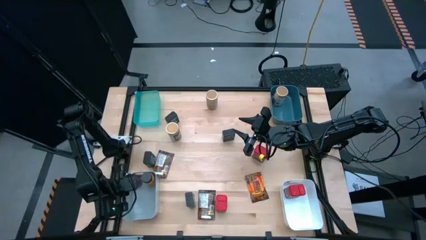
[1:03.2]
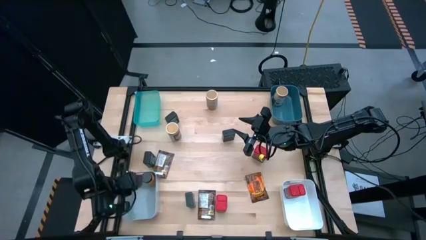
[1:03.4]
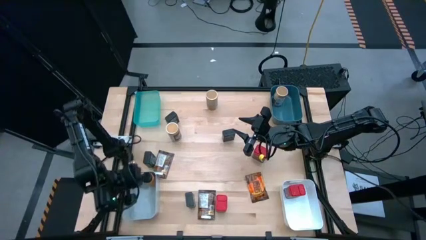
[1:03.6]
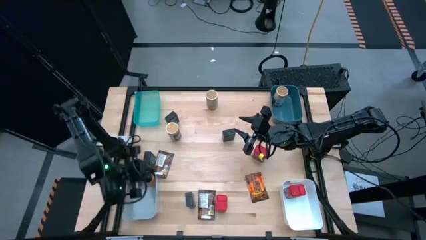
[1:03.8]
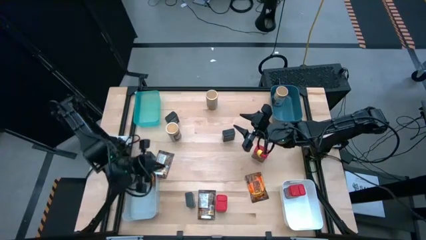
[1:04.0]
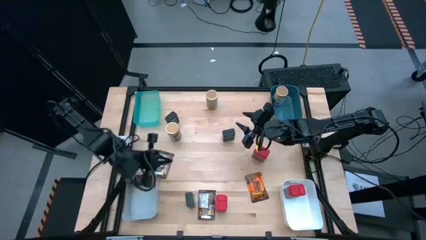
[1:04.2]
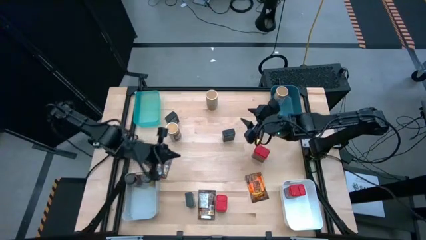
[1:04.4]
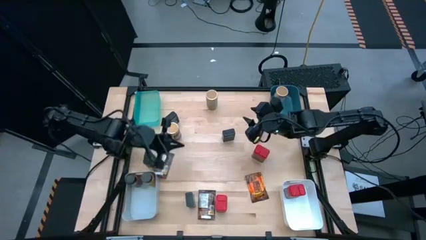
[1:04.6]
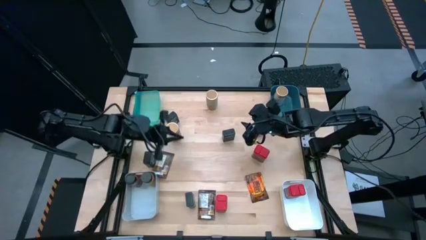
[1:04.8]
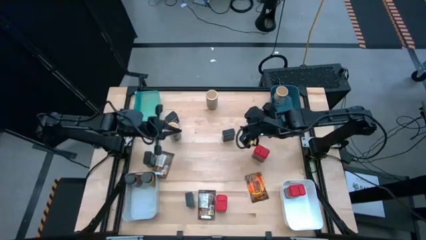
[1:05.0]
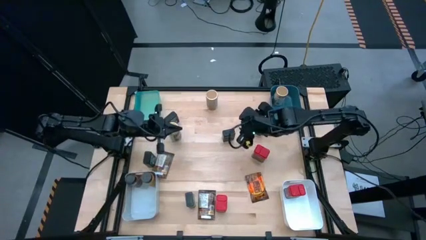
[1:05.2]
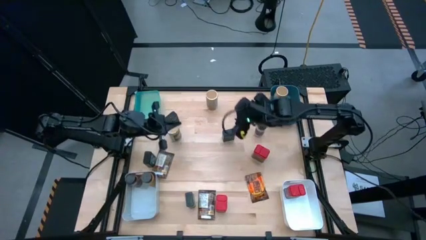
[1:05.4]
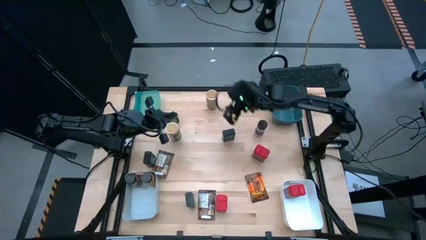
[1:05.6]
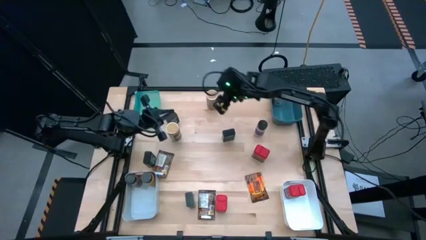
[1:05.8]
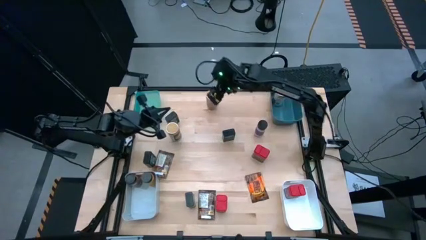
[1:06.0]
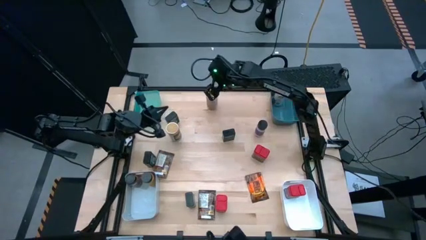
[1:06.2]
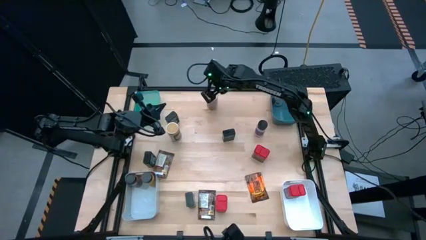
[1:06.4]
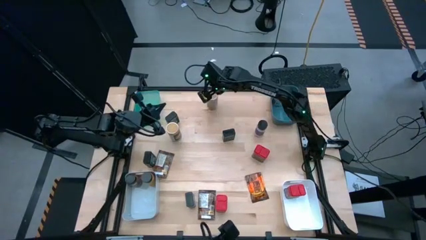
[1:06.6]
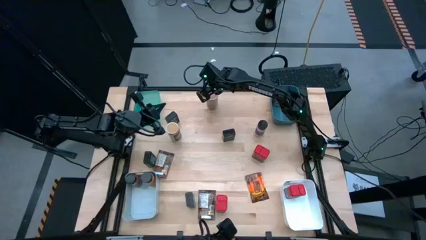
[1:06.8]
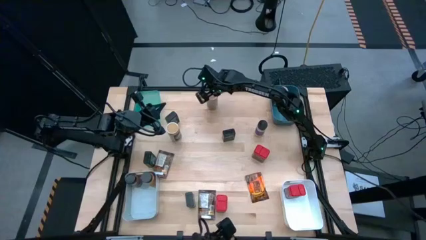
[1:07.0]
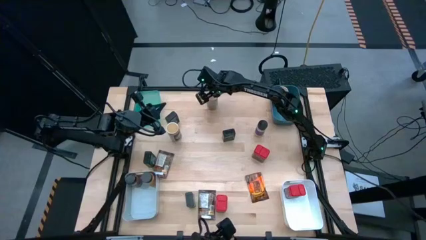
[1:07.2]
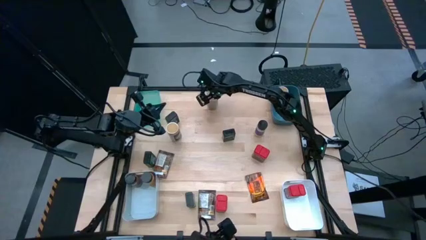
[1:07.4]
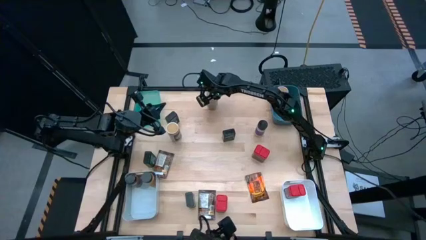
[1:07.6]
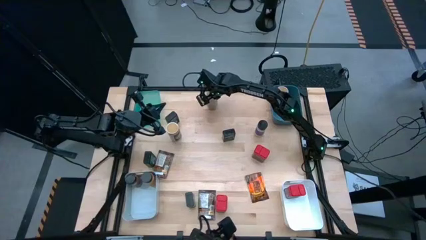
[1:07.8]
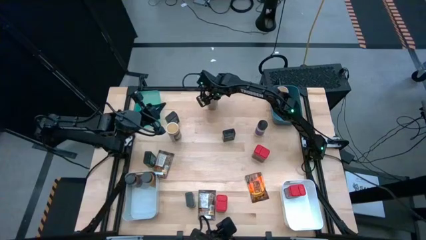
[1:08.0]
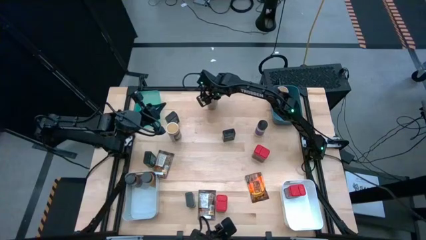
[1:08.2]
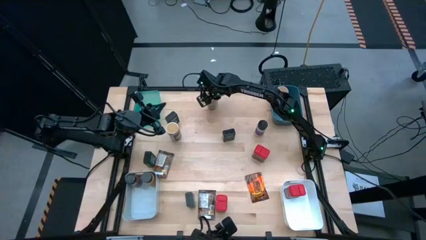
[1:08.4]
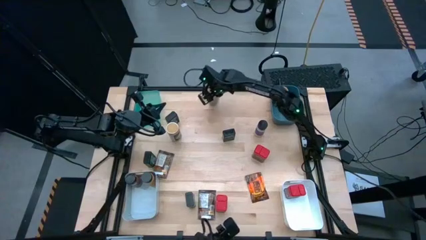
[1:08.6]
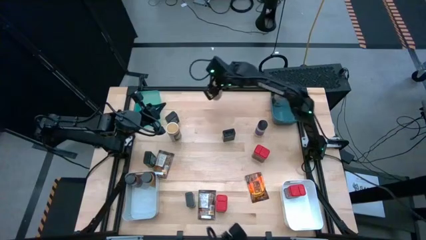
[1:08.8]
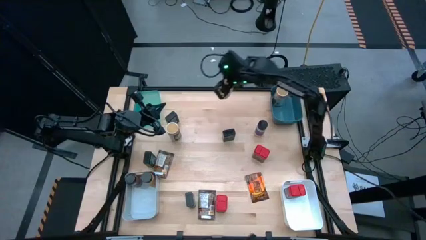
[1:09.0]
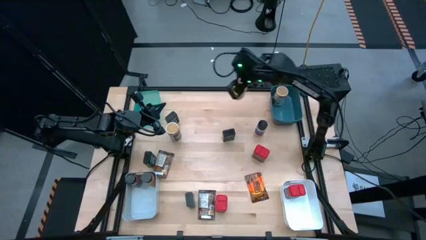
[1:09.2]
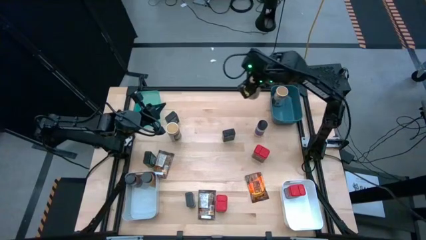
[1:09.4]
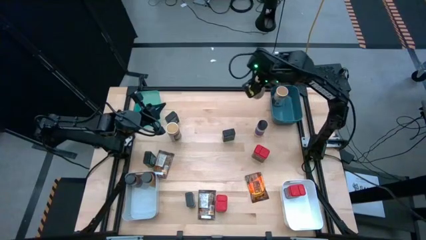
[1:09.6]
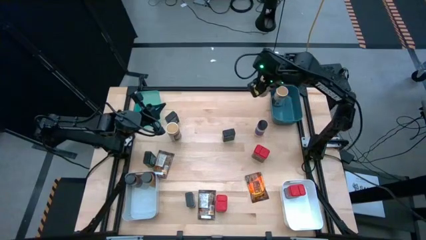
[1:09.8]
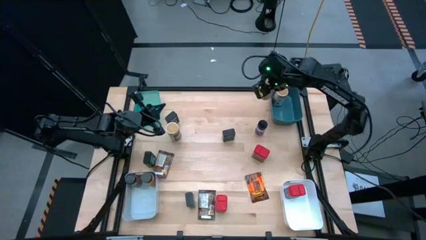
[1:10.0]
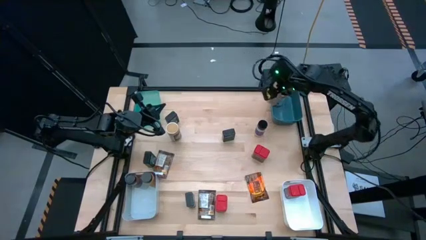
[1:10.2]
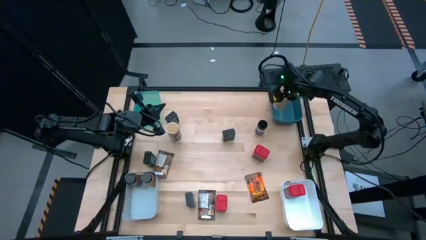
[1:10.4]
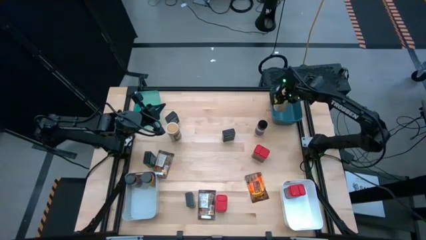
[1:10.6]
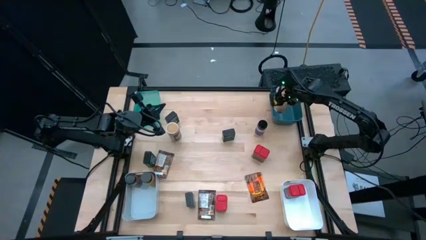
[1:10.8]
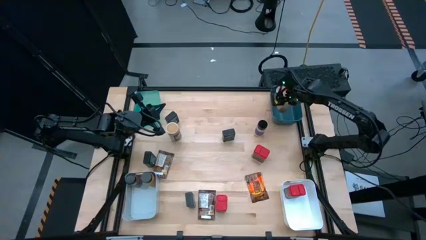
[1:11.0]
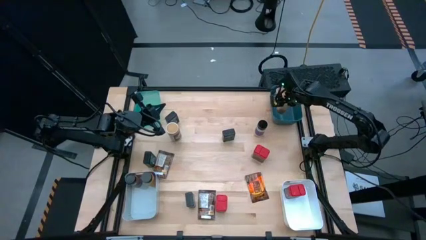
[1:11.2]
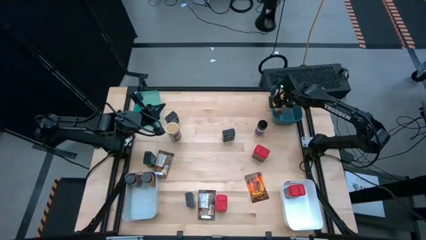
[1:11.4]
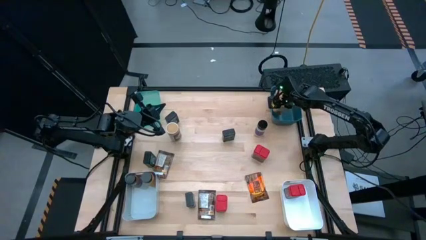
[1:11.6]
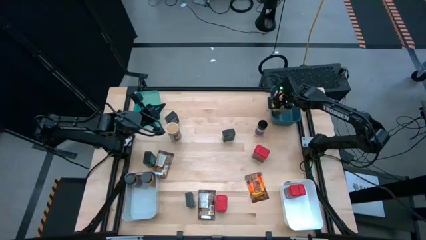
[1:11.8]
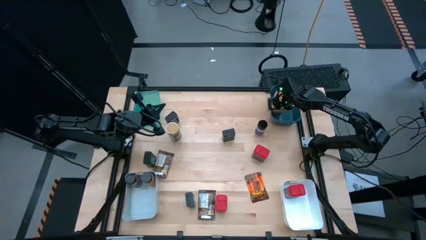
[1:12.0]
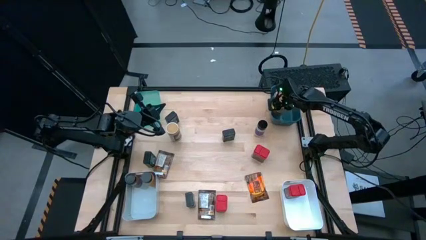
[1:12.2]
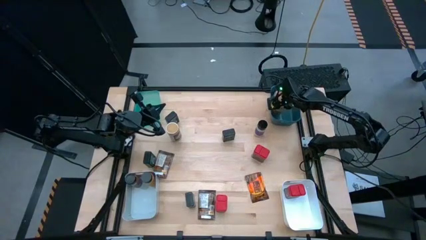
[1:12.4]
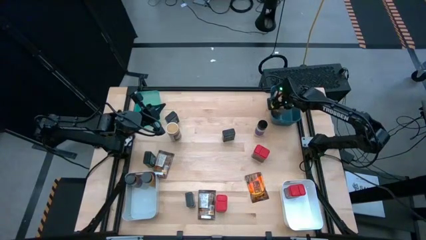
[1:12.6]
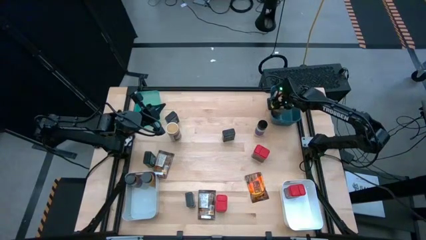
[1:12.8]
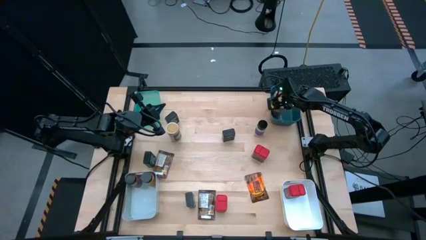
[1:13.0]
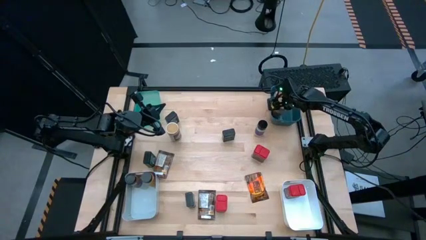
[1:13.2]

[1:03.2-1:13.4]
Task: Sort spices by type
Put the top brown seasoning bottle into the dark green bin

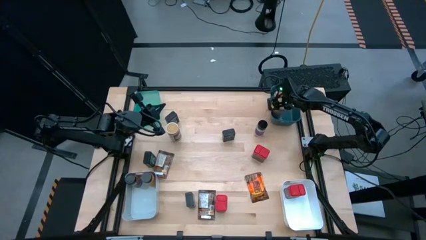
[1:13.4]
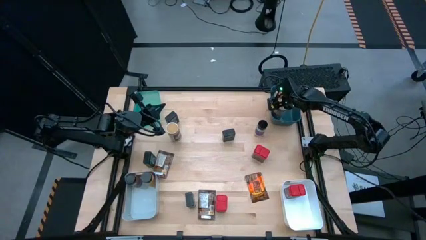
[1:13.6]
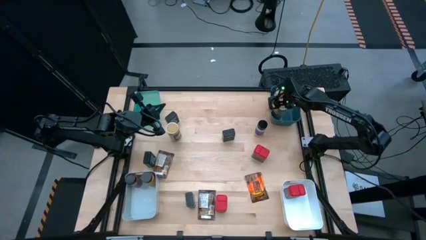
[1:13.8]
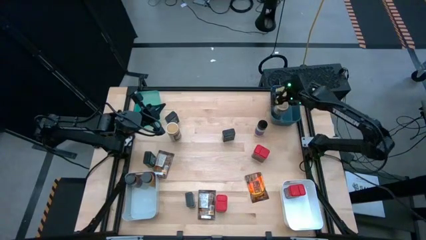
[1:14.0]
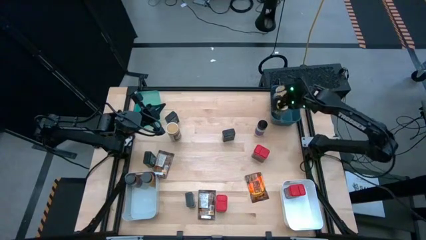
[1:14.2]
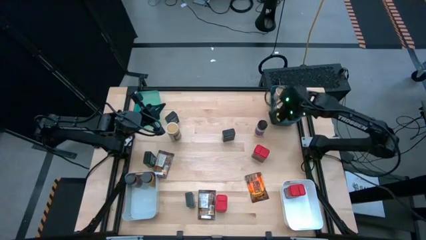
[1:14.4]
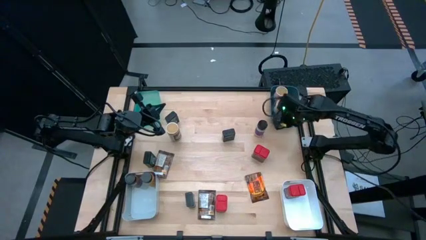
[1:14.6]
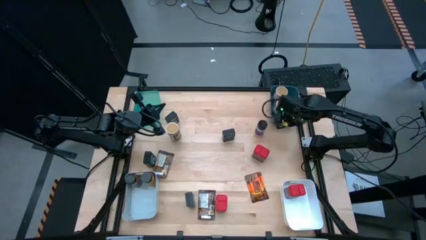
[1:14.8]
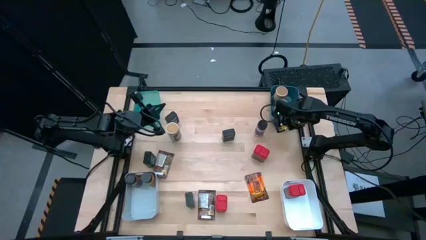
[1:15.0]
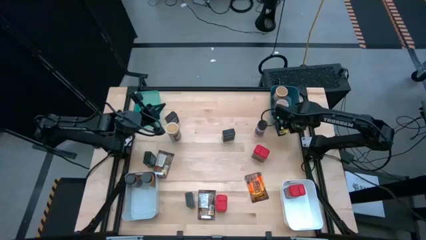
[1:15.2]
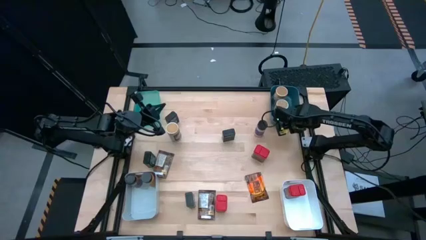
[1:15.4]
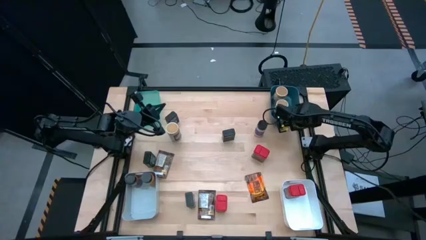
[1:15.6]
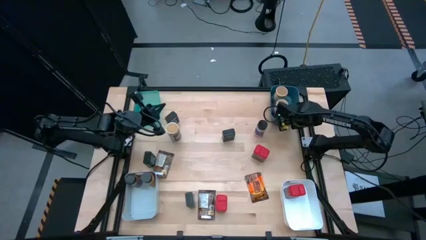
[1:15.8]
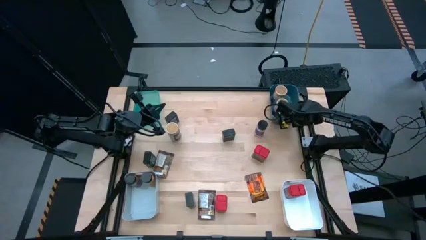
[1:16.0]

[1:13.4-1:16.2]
Adjust the dark green bin
